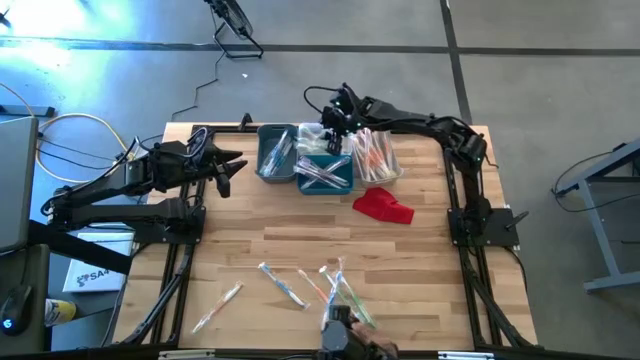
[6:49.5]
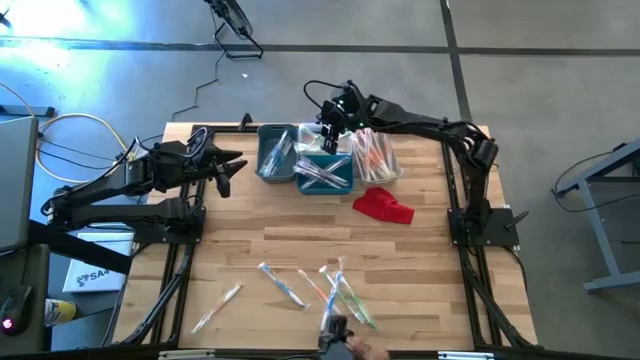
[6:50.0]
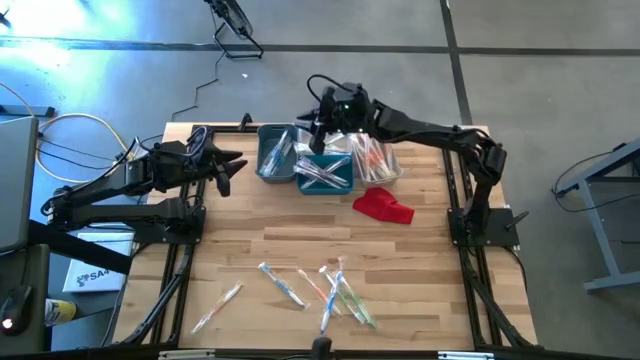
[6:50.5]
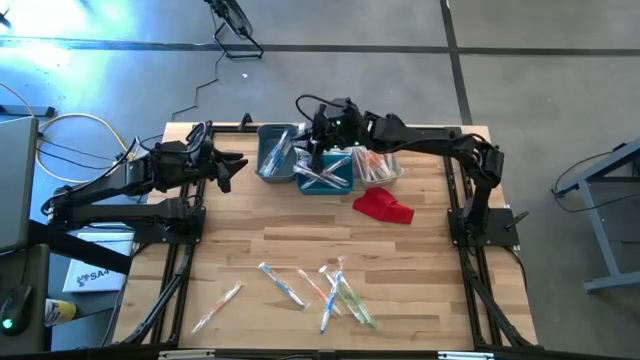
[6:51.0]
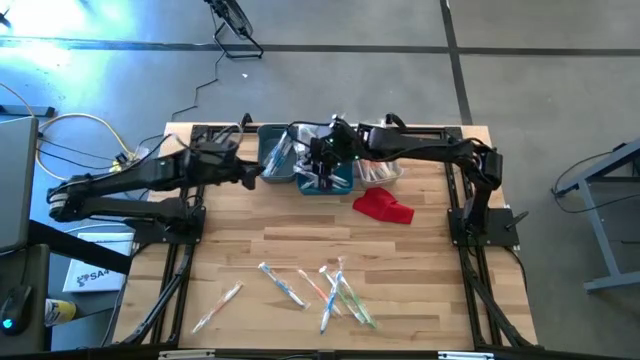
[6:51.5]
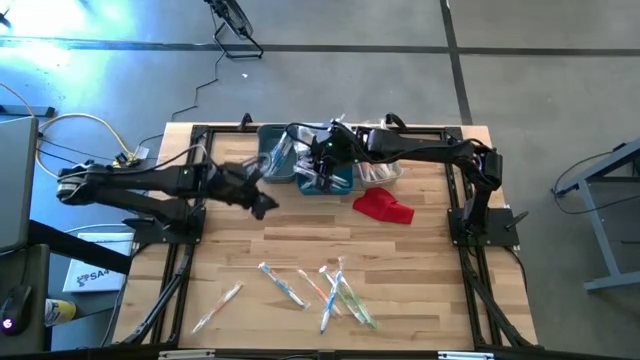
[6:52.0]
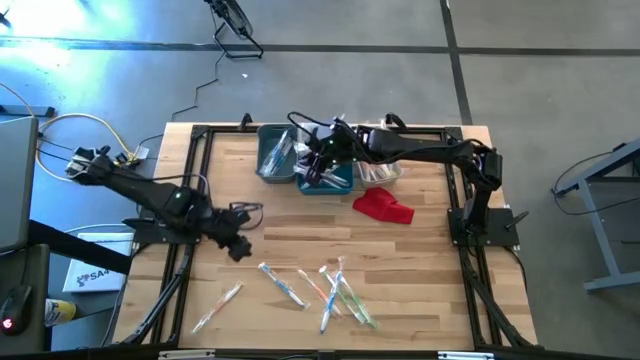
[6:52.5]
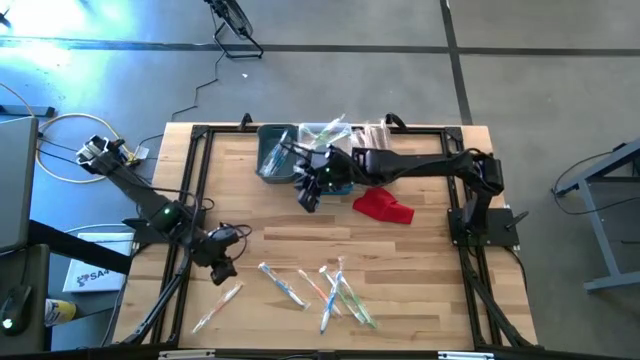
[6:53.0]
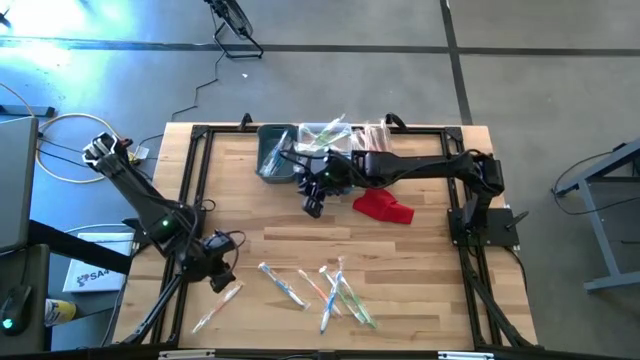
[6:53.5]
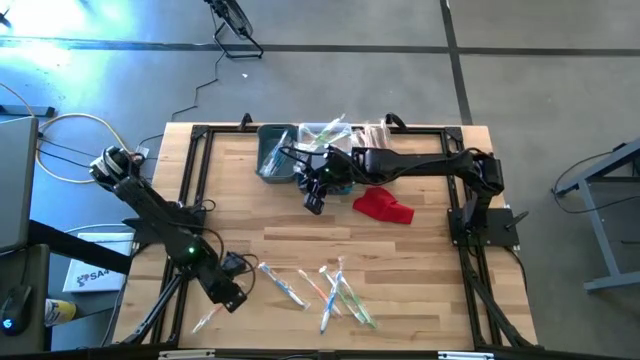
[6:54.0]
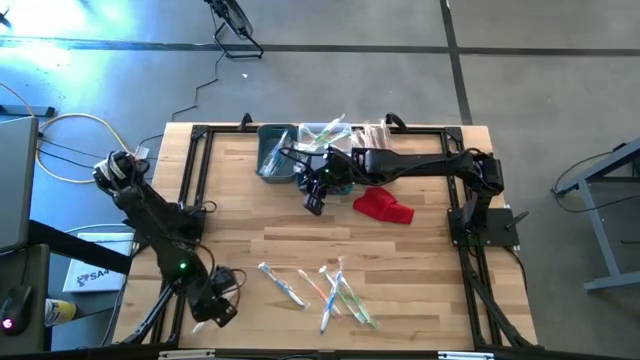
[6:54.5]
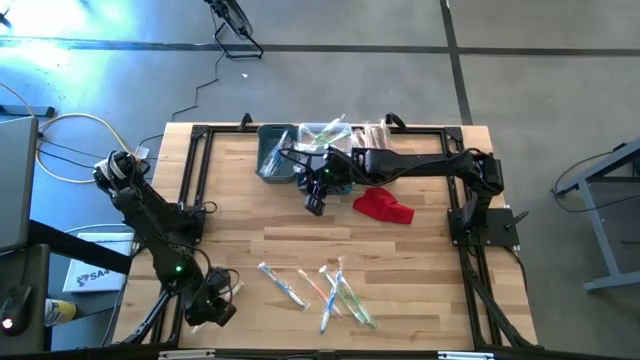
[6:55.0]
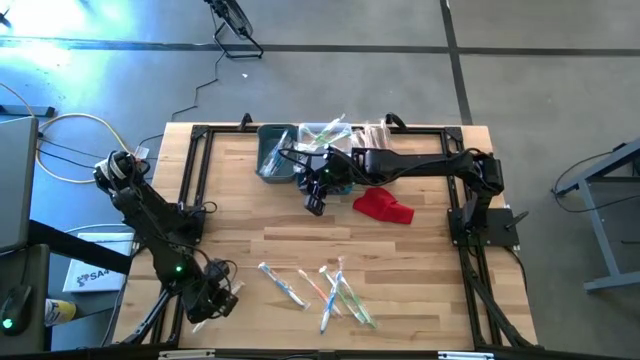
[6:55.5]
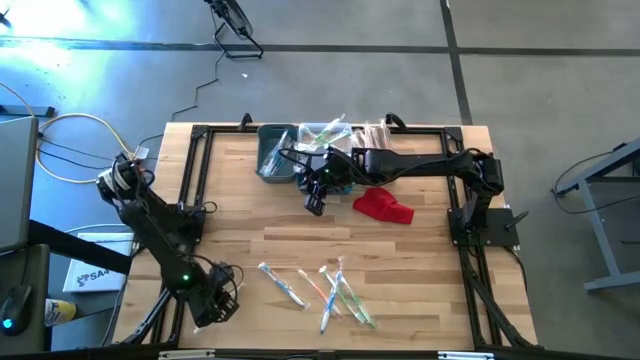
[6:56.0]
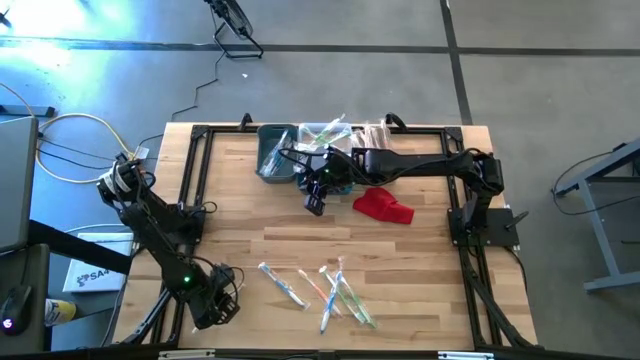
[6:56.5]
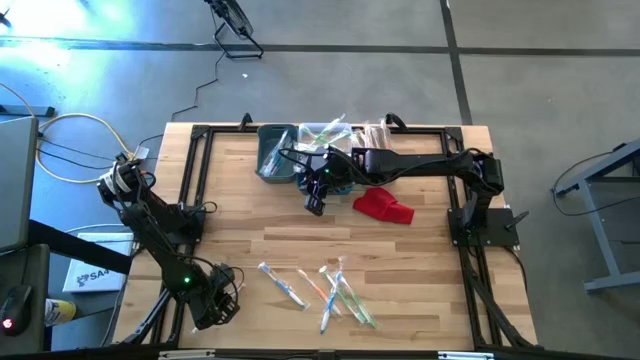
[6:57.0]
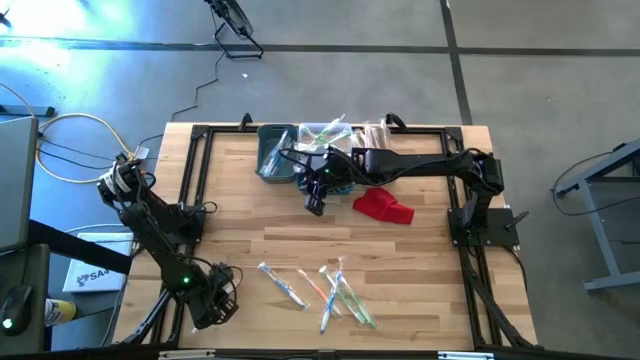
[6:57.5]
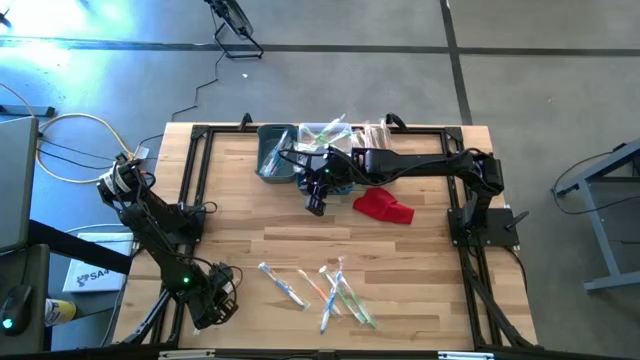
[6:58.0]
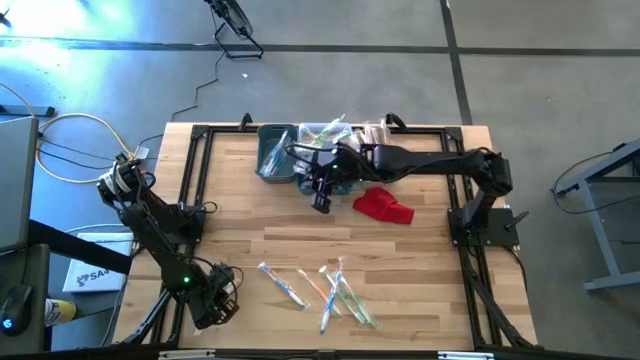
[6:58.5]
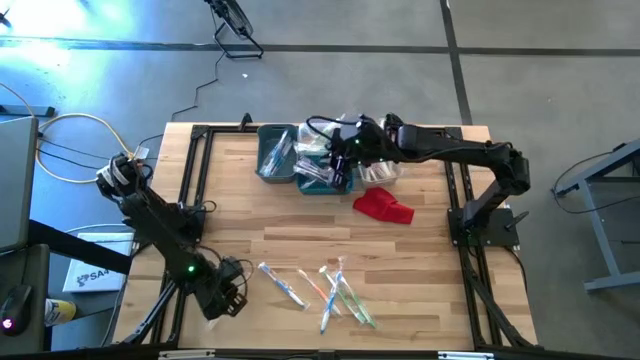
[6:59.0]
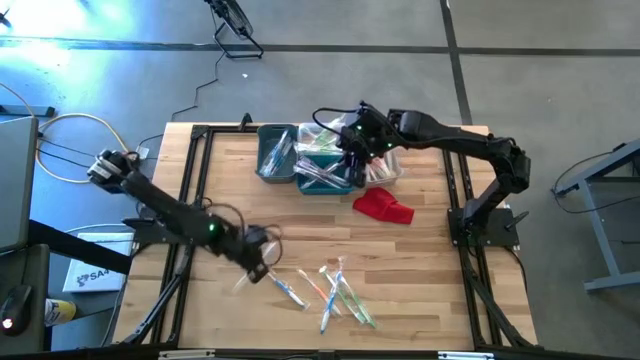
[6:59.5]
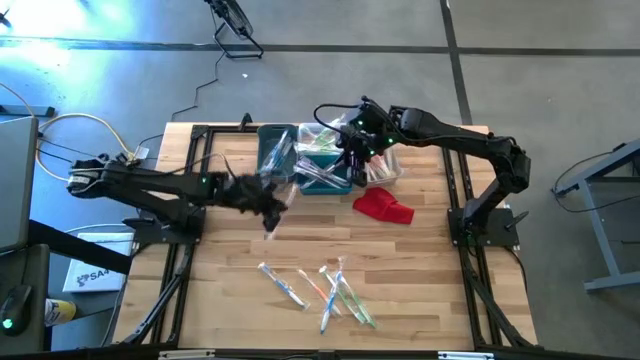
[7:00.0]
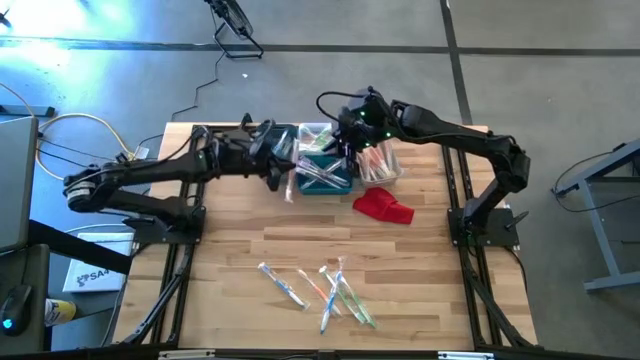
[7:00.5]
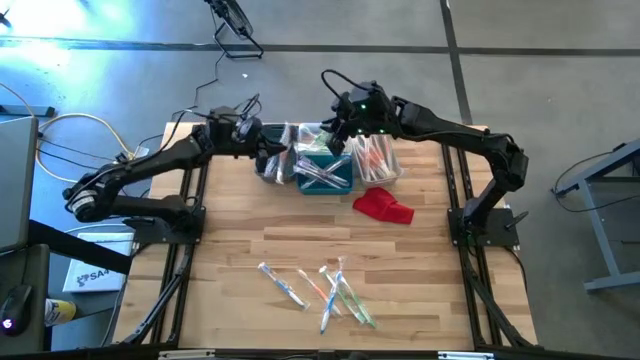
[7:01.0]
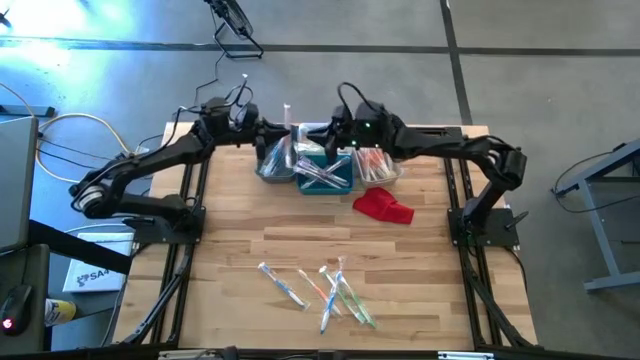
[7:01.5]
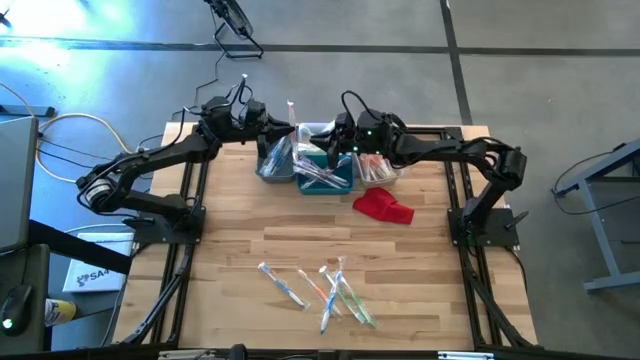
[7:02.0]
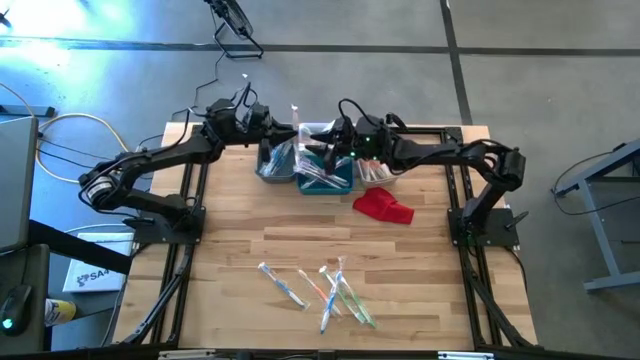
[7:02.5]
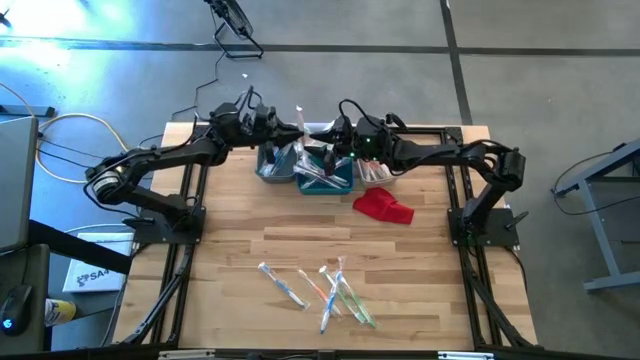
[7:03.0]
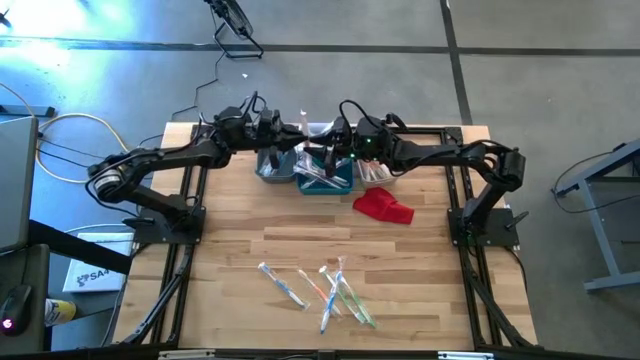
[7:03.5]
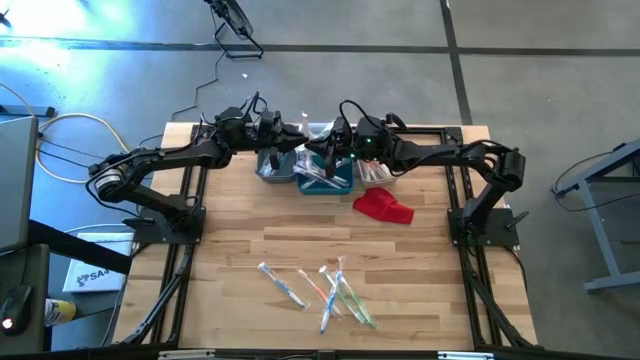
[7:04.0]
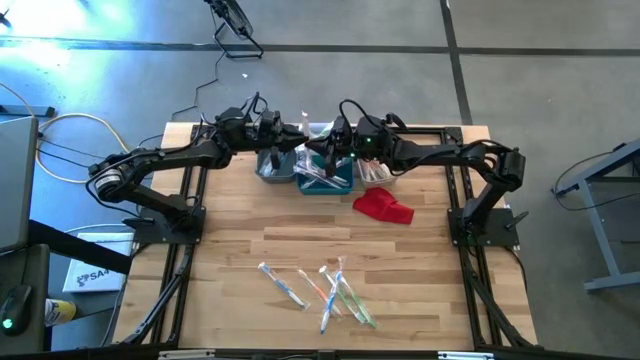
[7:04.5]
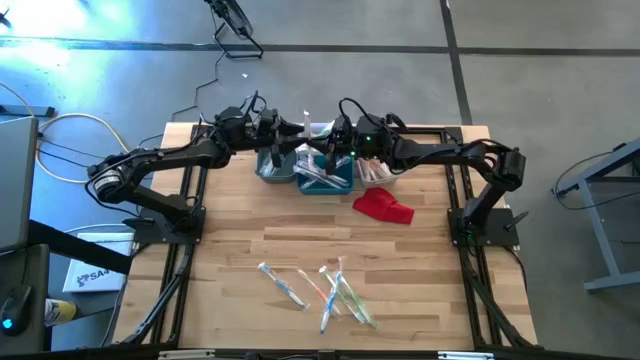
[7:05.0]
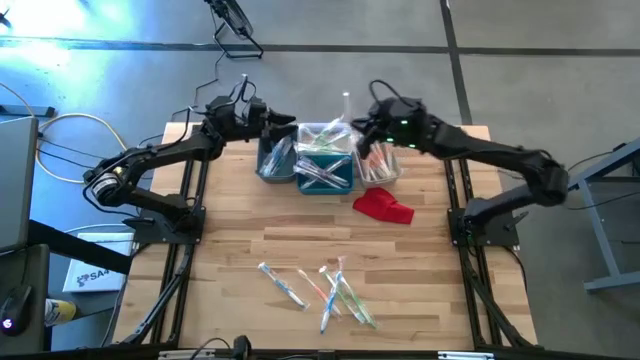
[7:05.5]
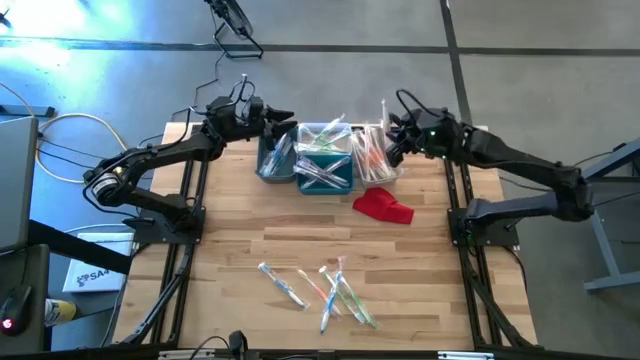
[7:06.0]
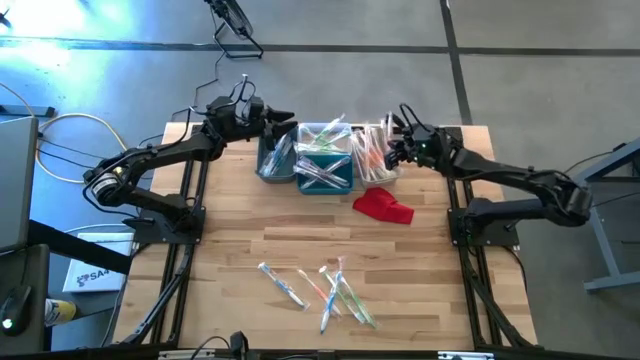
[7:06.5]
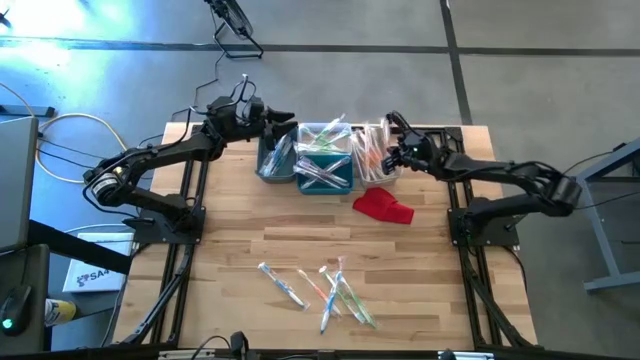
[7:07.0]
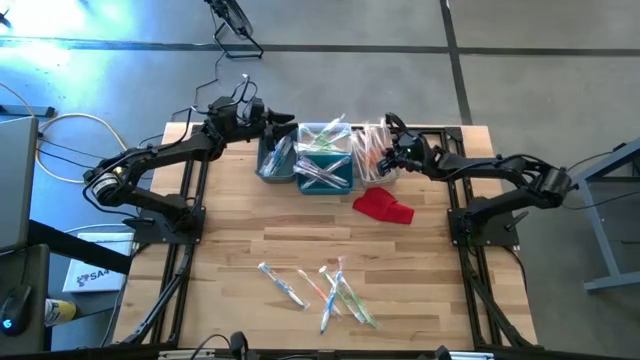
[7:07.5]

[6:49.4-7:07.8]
Task: Pick & Place Toothbrushes
Put the left orange toothbrush into the white bin

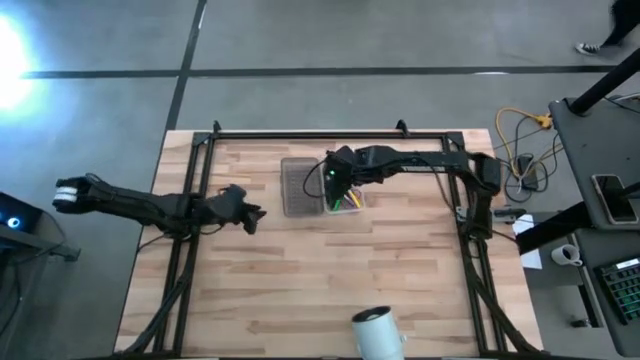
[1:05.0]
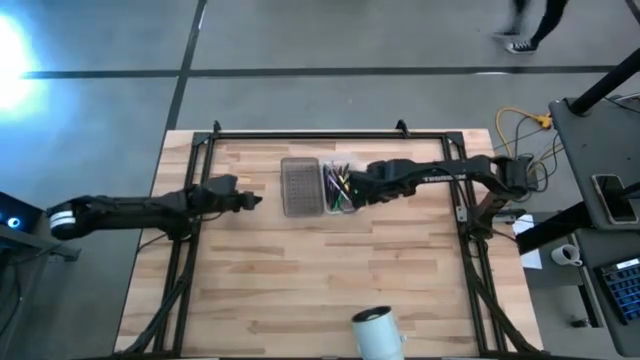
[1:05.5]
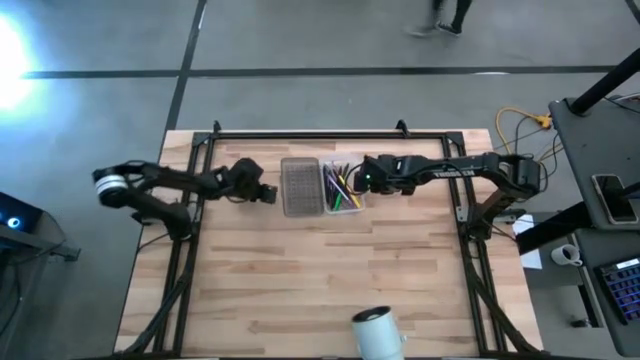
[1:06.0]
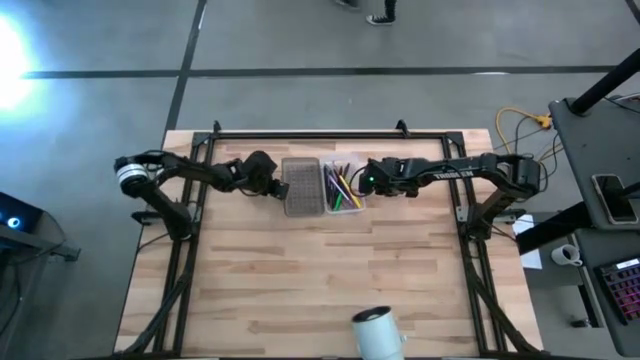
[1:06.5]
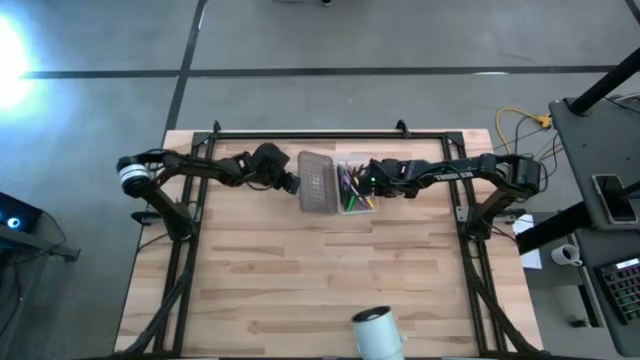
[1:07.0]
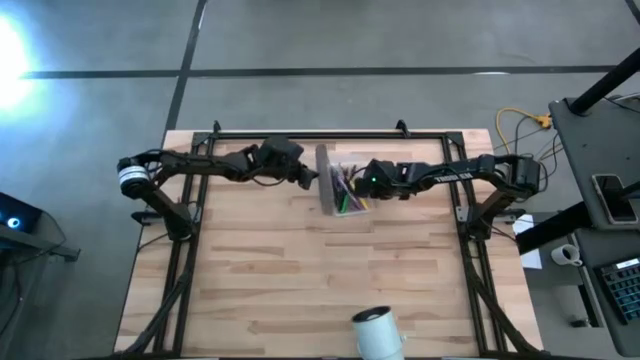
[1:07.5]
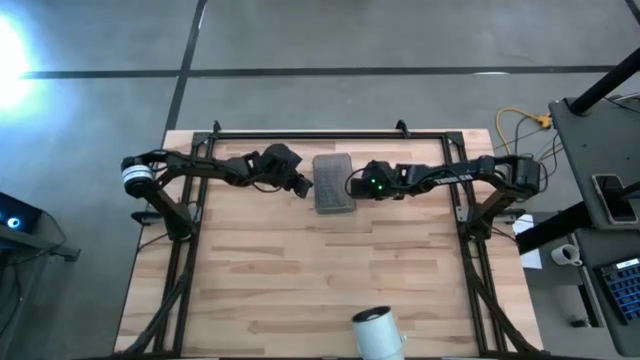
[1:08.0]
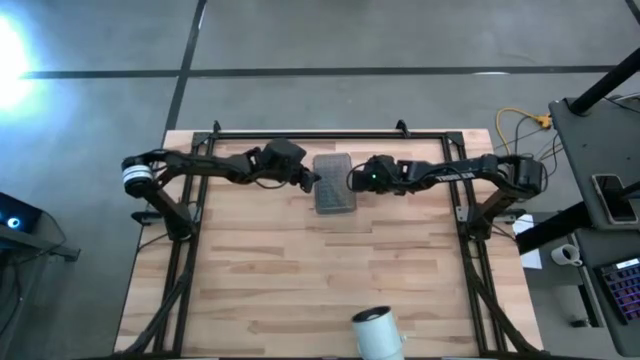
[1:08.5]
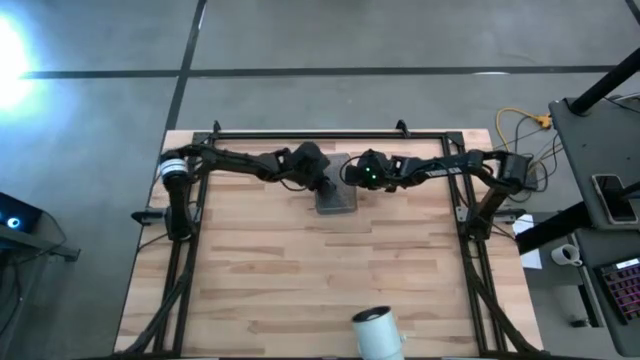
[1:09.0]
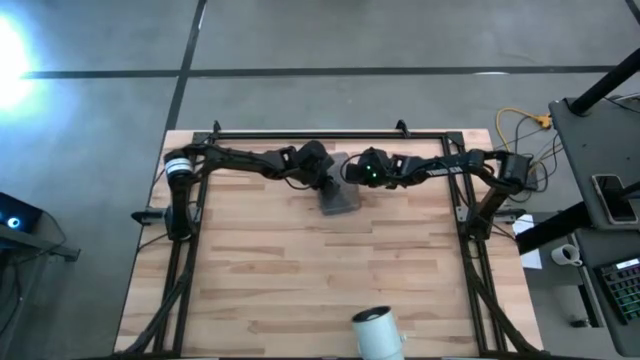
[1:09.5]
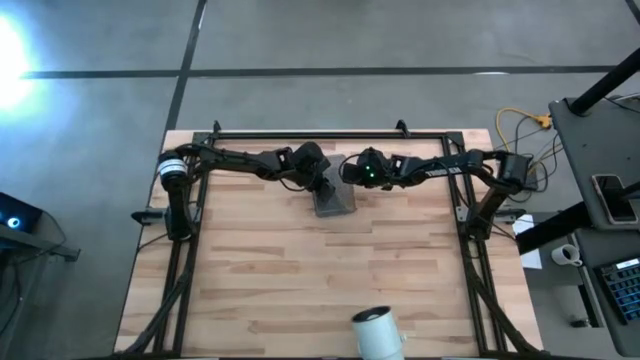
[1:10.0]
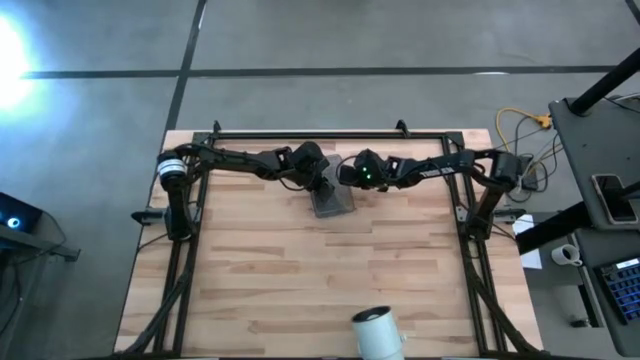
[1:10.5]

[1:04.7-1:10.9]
Task: Pick & place school supplies into a supply box
Close the gray supply box
